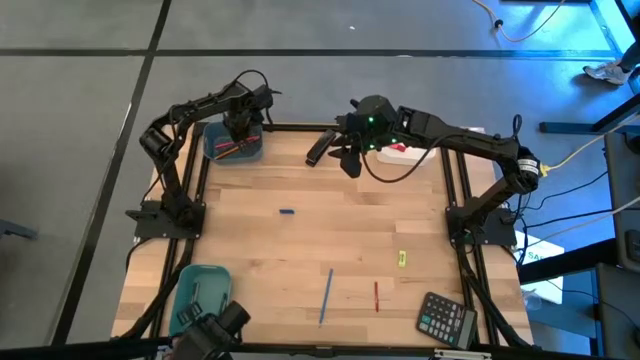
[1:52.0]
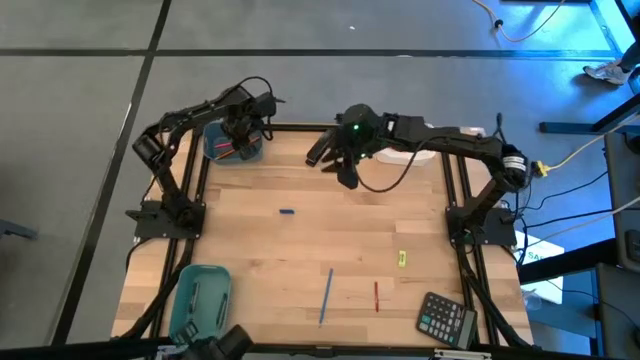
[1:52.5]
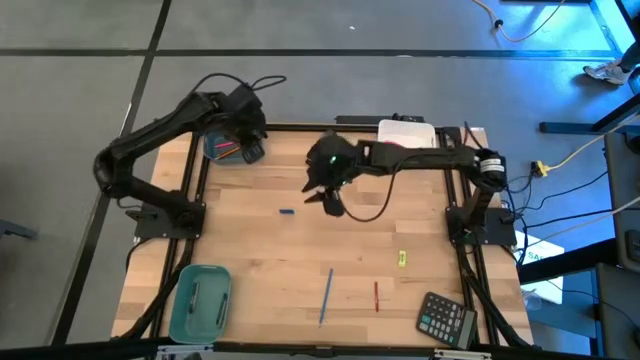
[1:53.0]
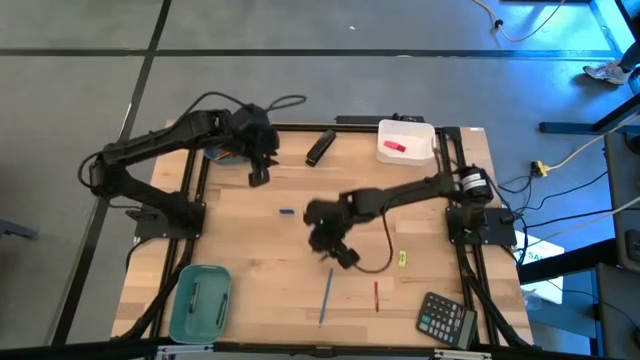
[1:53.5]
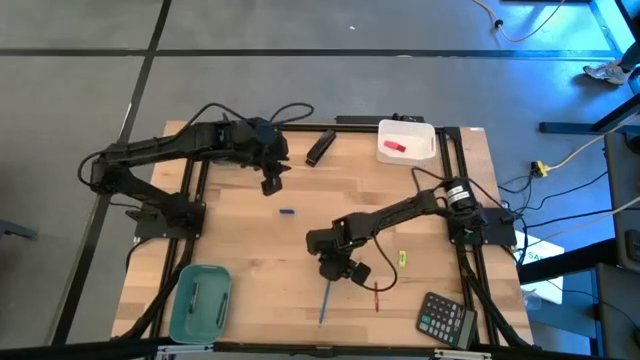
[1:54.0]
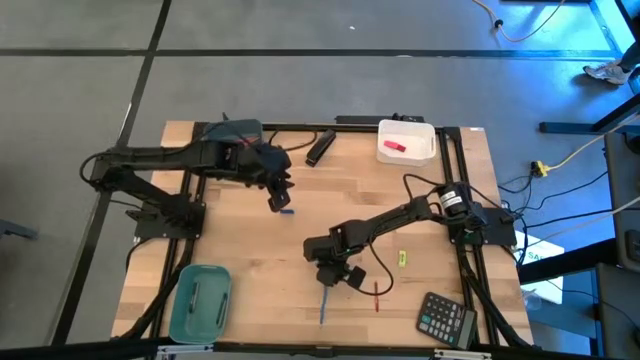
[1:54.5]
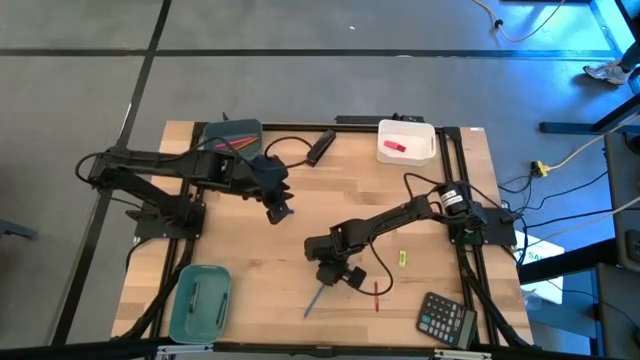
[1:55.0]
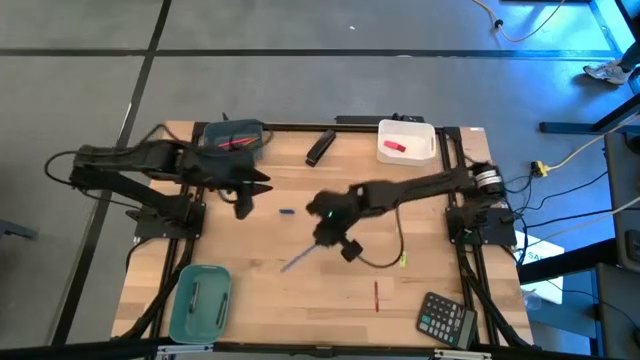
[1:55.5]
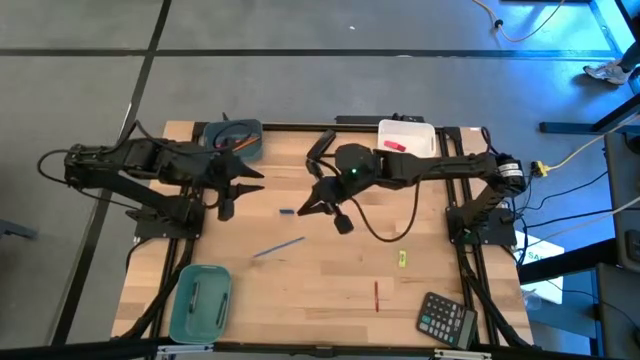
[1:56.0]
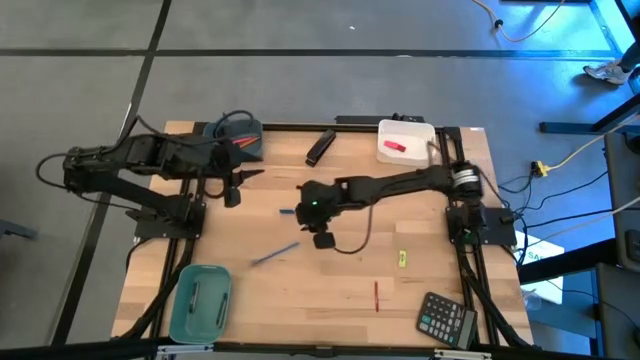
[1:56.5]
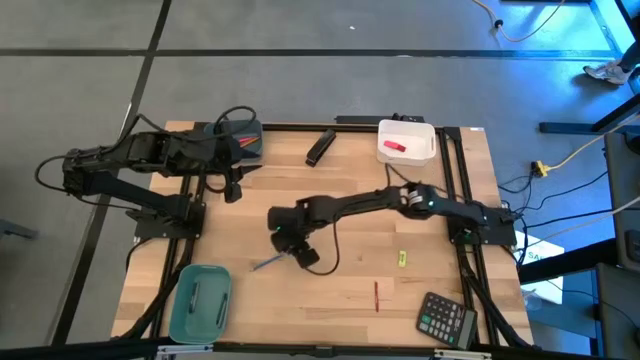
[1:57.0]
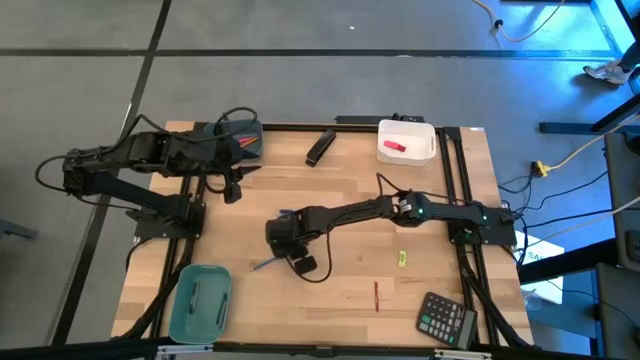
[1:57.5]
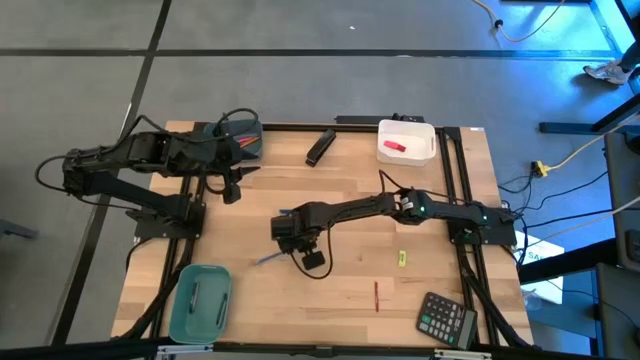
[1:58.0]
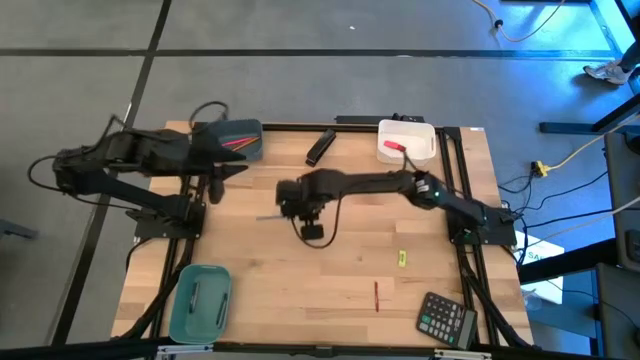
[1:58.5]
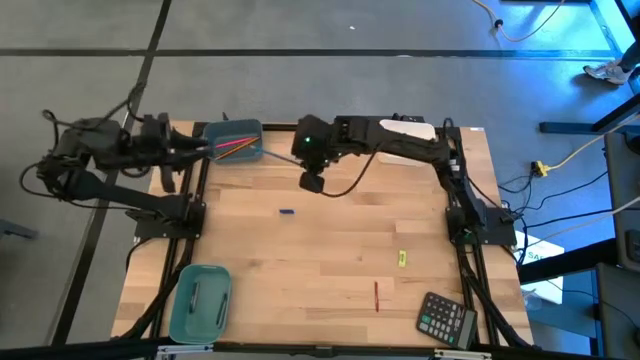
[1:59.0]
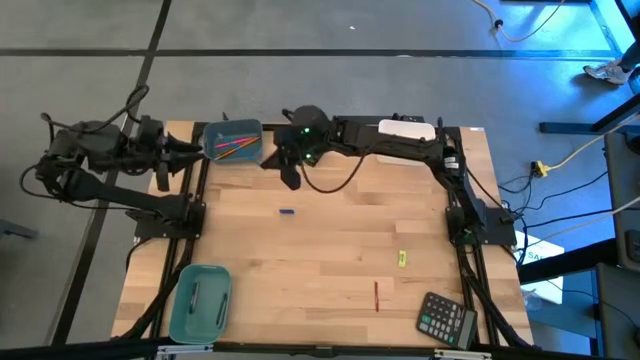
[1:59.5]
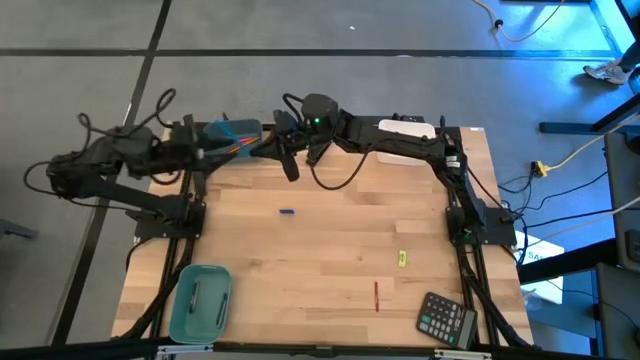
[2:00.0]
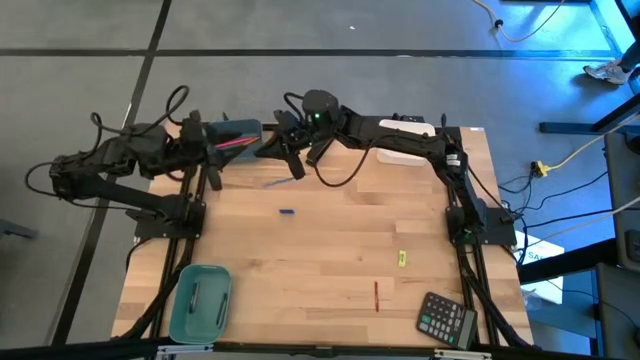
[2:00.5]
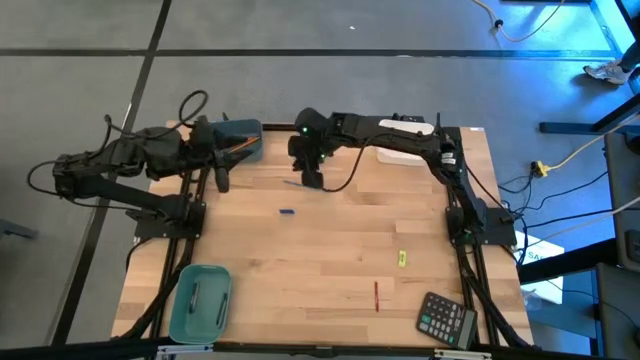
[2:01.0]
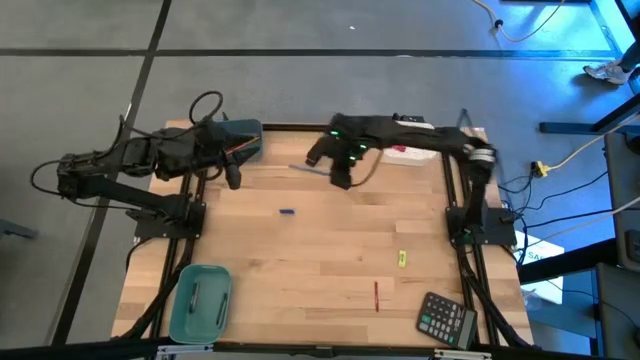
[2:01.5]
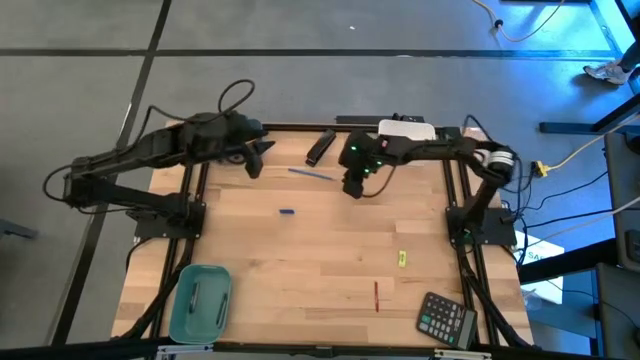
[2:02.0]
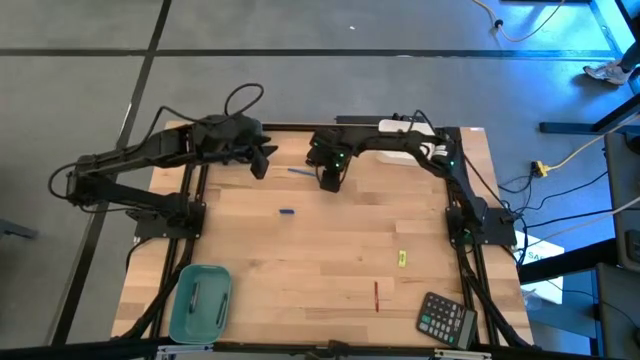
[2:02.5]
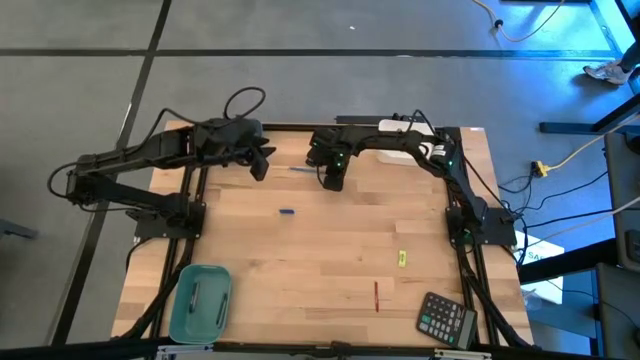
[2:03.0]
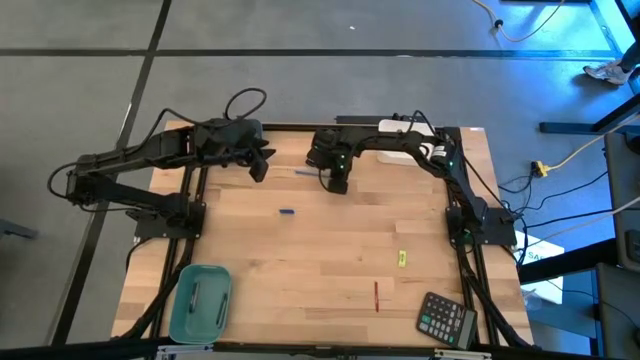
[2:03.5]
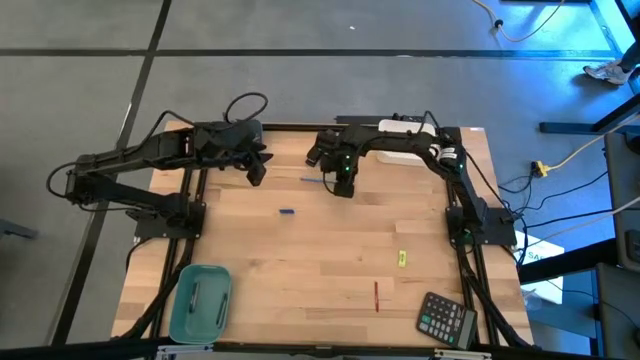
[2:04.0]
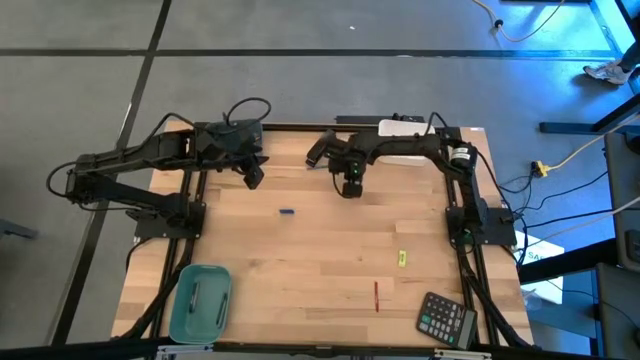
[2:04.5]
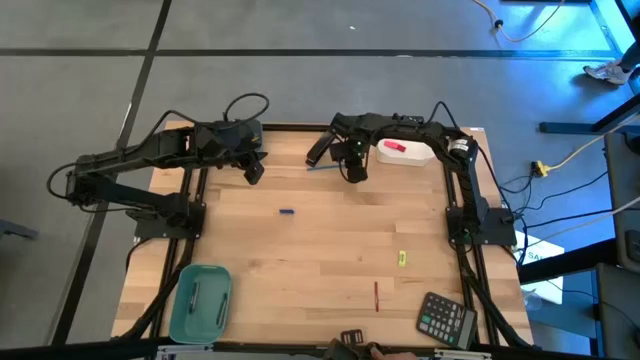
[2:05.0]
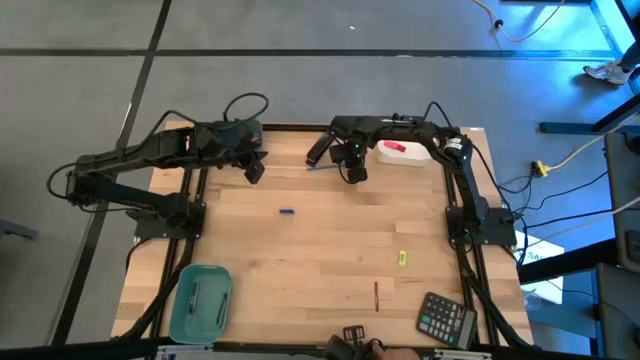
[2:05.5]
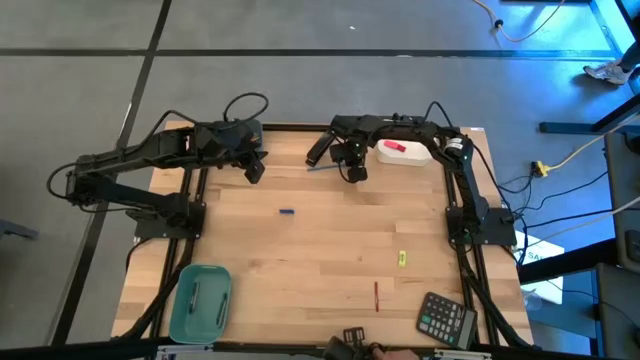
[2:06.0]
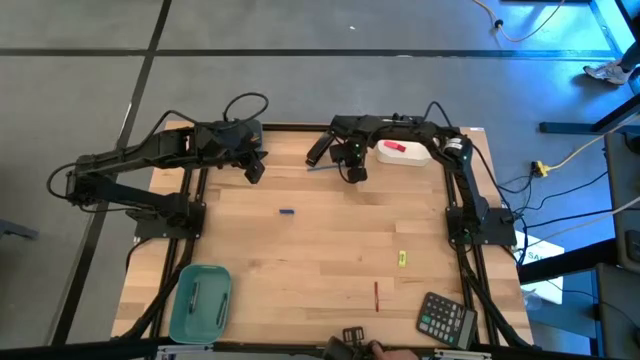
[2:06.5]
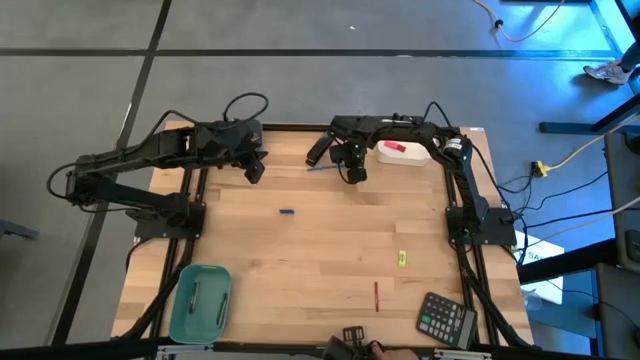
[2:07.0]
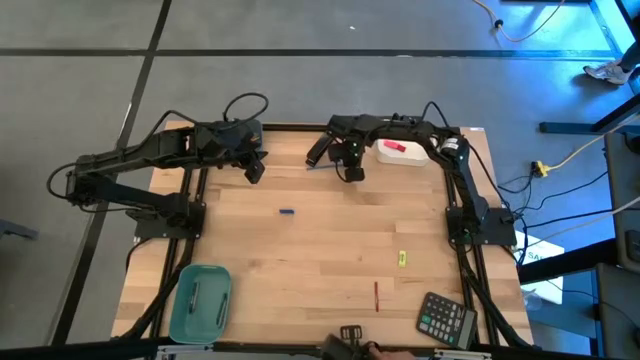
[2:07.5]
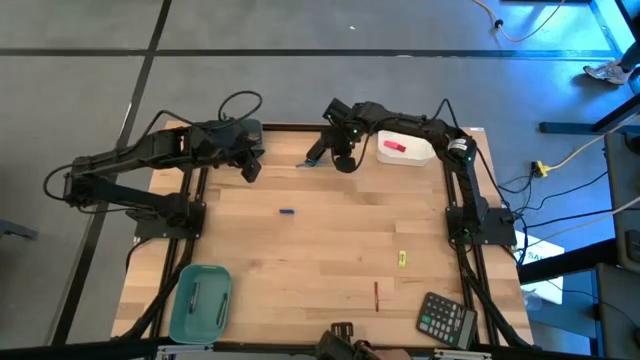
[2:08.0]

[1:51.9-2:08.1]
Task: Sort crayons/erasers/pens/pencils in bins
Put the blue pencil into the blue bin

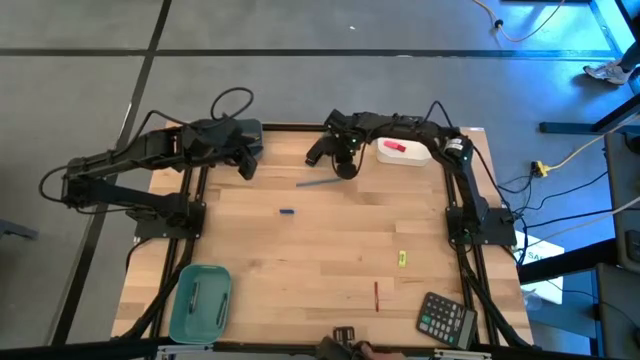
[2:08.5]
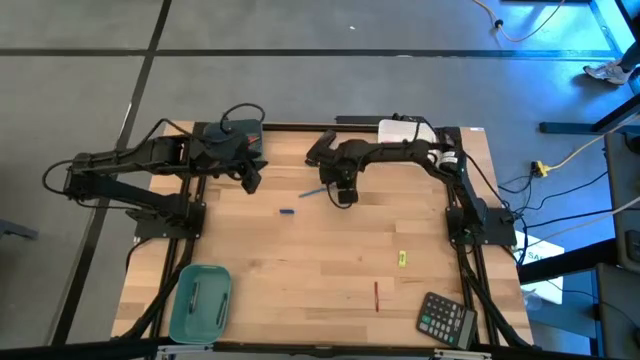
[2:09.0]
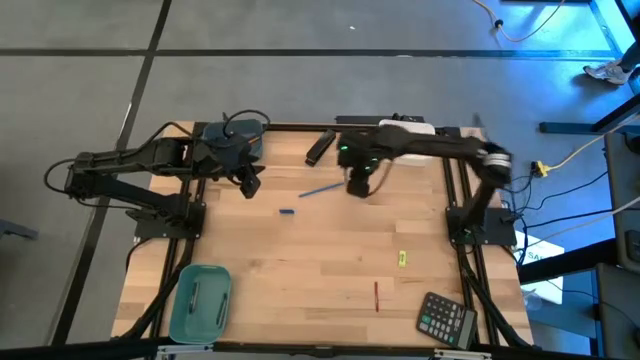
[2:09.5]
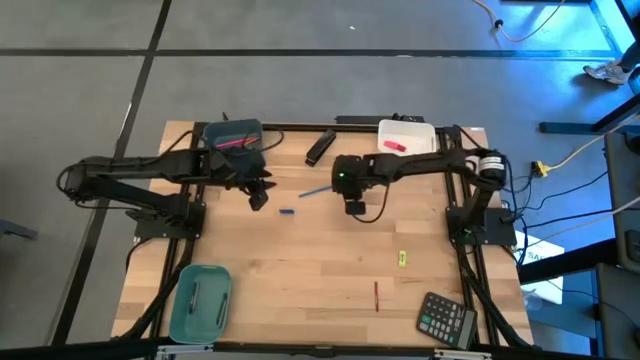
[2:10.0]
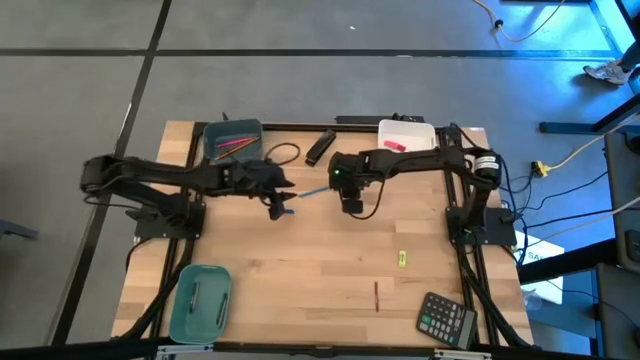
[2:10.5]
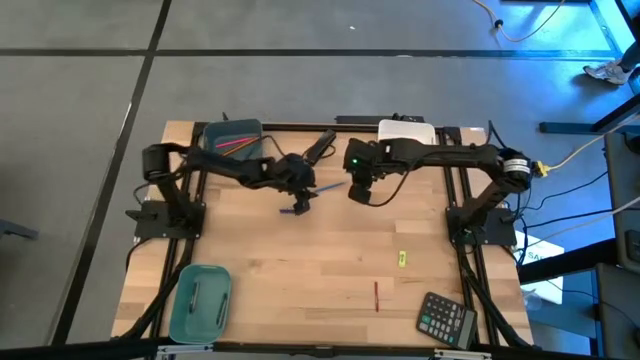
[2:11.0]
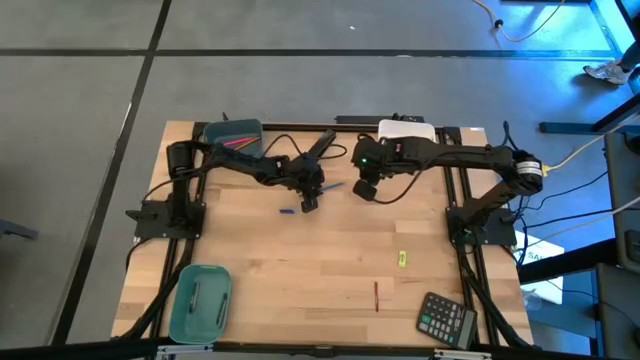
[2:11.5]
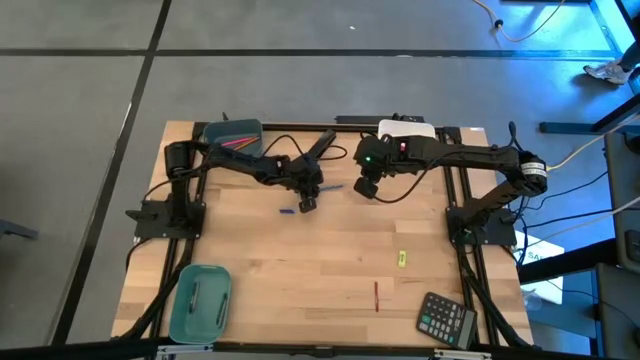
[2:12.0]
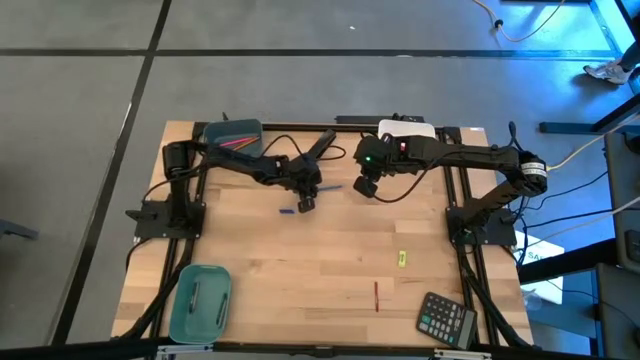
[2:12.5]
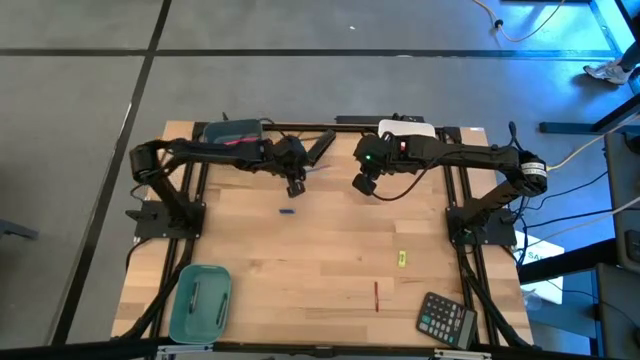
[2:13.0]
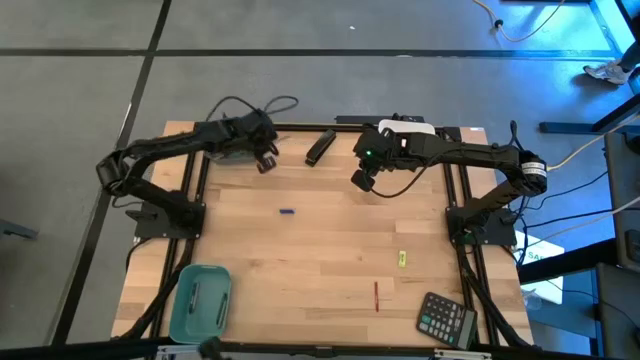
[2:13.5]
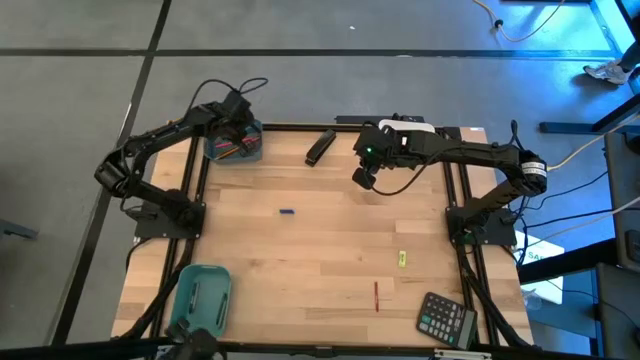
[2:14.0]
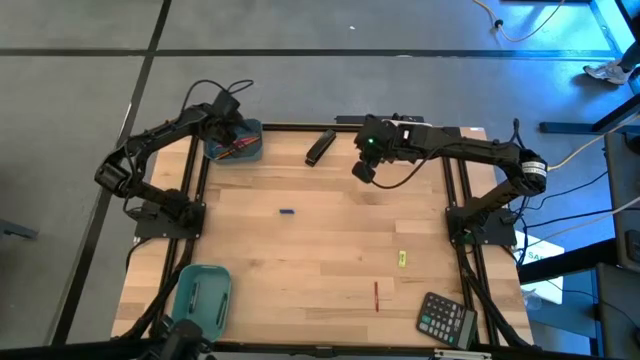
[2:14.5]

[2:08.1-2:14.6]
Put the blue pencil into the blue bin
